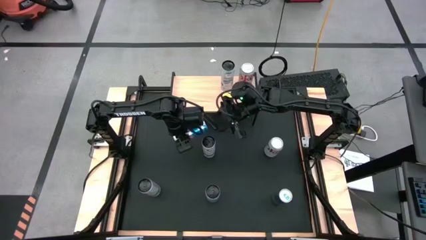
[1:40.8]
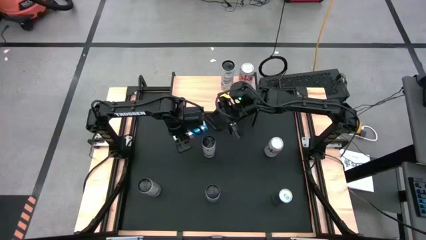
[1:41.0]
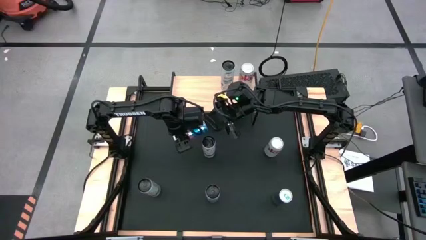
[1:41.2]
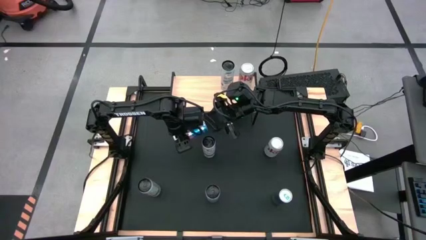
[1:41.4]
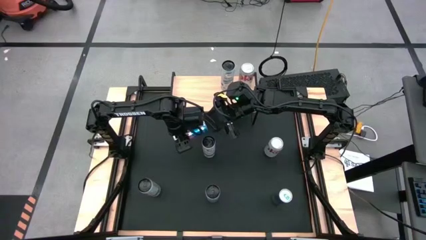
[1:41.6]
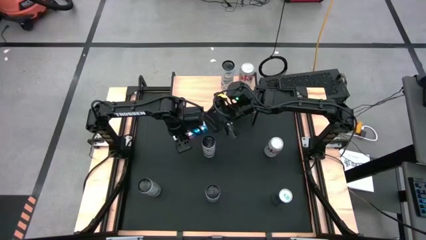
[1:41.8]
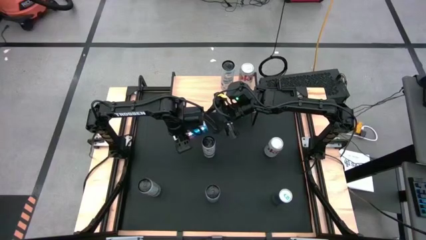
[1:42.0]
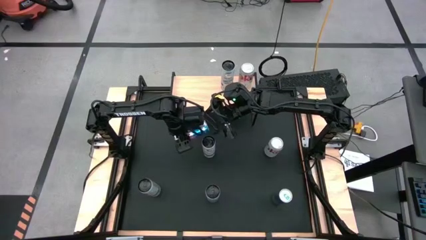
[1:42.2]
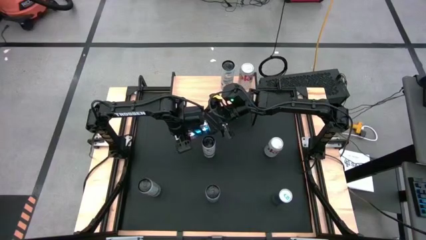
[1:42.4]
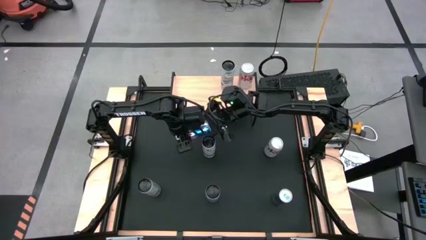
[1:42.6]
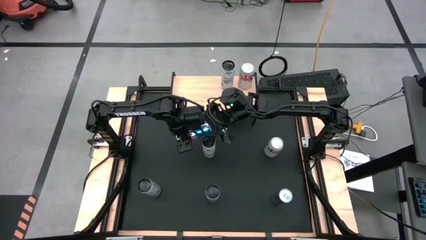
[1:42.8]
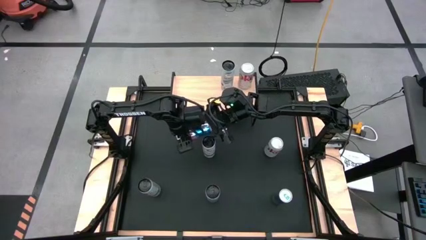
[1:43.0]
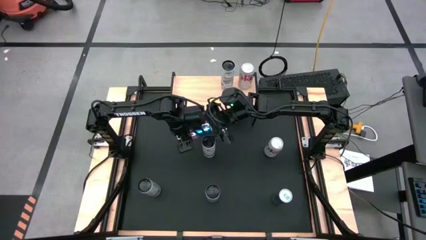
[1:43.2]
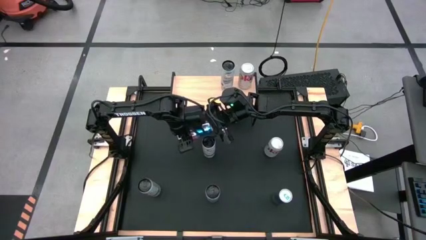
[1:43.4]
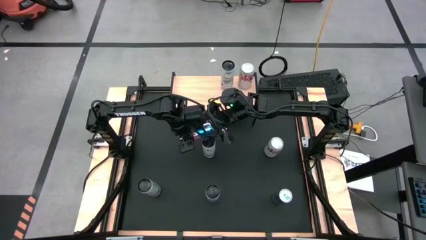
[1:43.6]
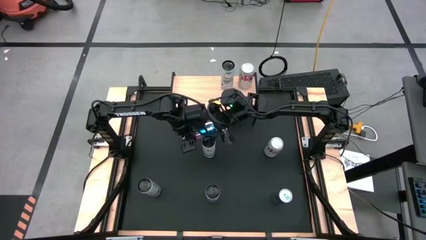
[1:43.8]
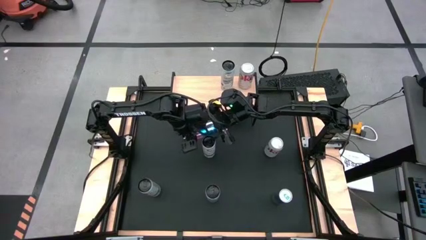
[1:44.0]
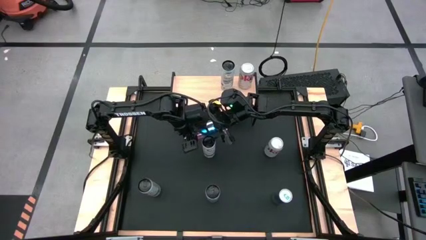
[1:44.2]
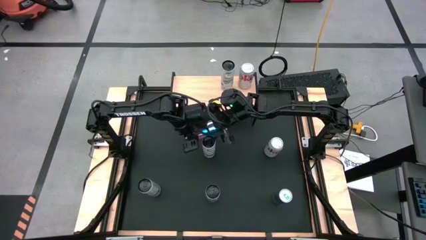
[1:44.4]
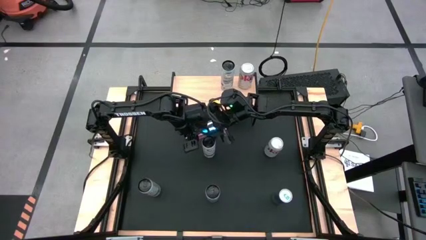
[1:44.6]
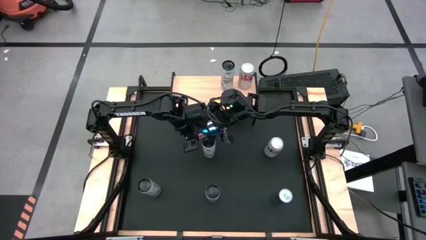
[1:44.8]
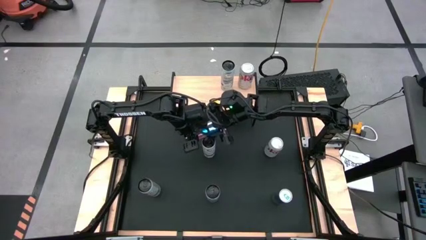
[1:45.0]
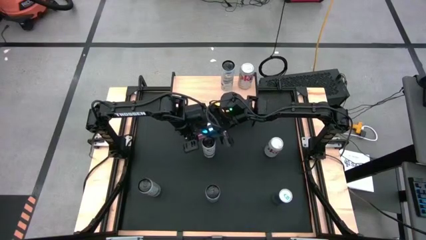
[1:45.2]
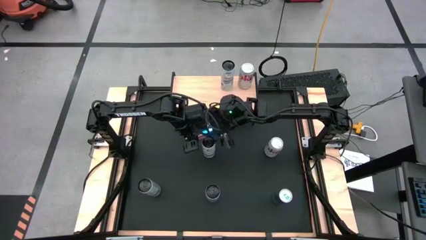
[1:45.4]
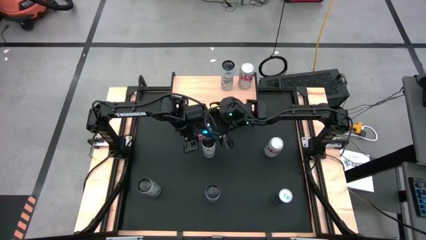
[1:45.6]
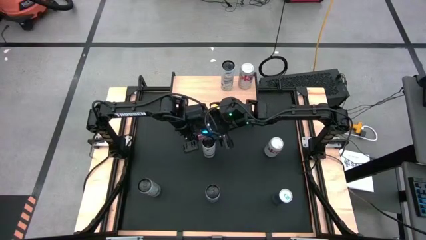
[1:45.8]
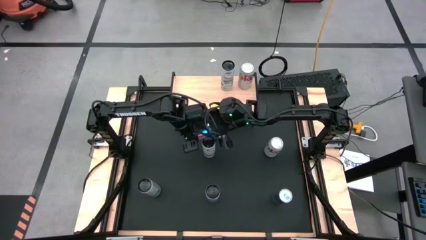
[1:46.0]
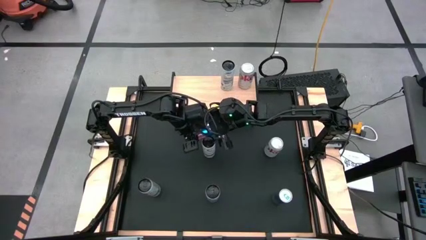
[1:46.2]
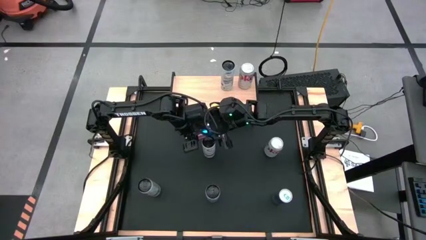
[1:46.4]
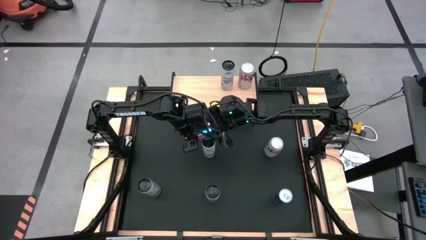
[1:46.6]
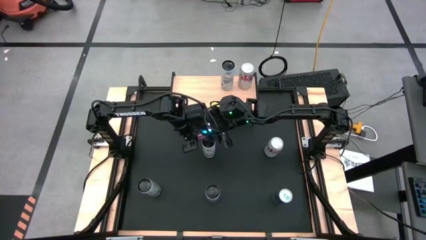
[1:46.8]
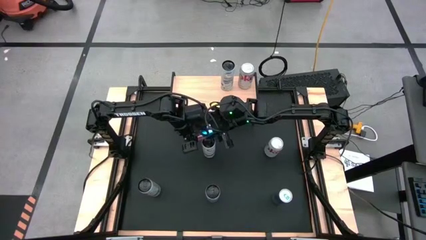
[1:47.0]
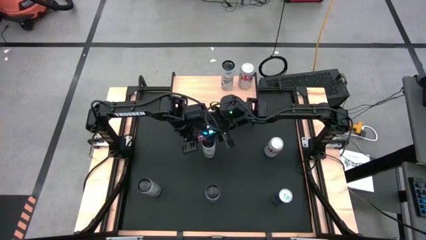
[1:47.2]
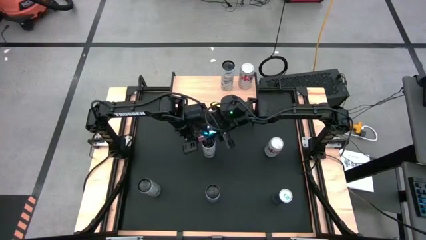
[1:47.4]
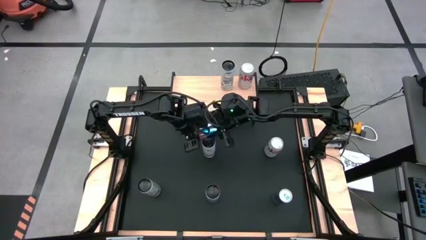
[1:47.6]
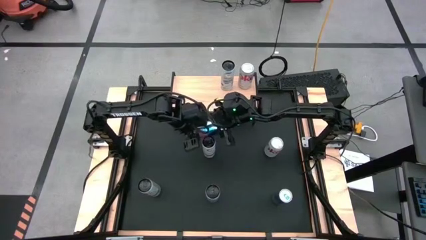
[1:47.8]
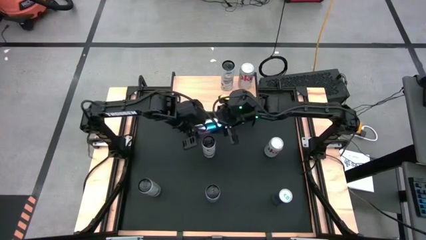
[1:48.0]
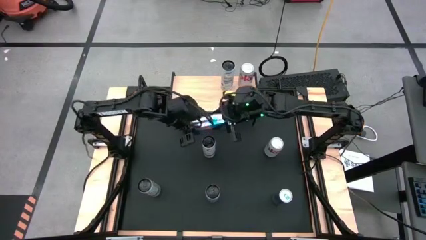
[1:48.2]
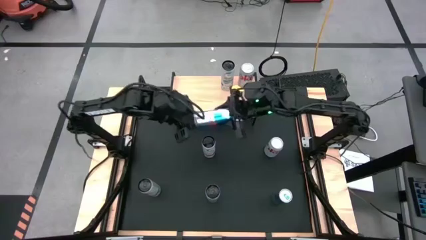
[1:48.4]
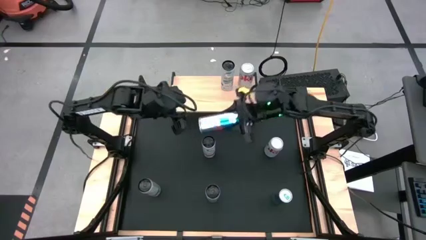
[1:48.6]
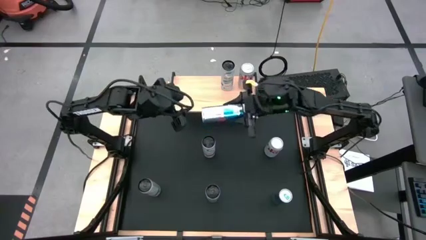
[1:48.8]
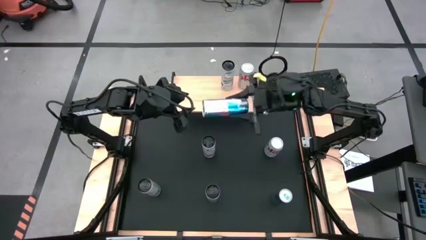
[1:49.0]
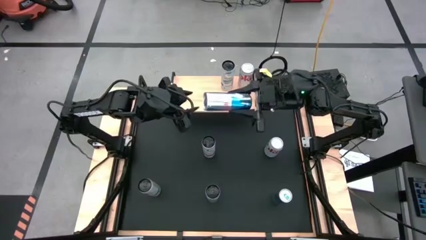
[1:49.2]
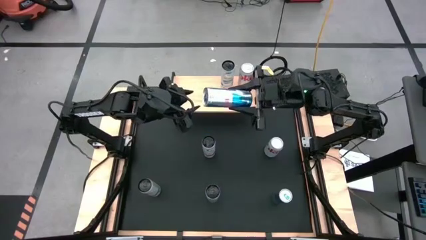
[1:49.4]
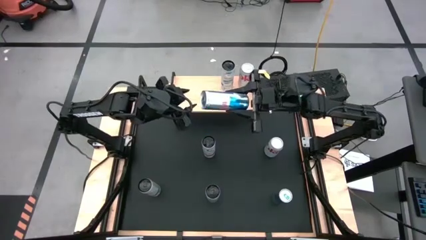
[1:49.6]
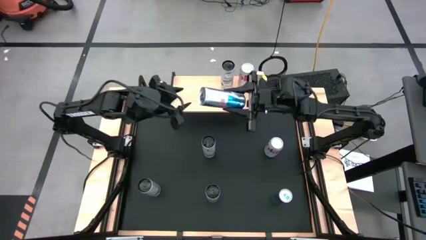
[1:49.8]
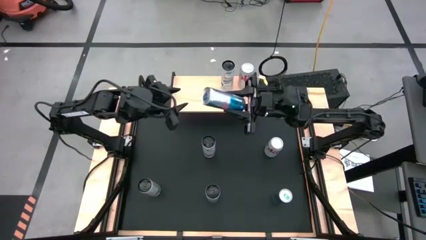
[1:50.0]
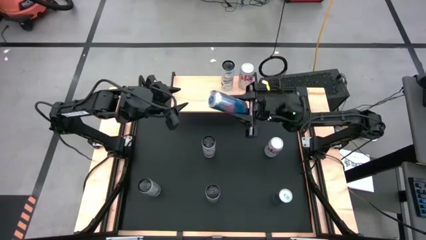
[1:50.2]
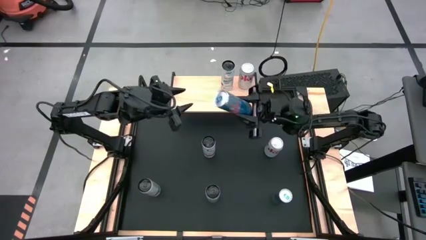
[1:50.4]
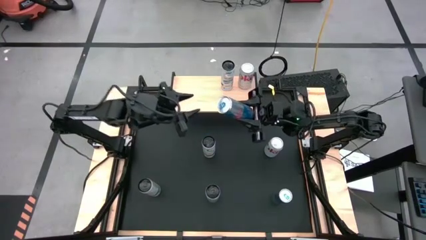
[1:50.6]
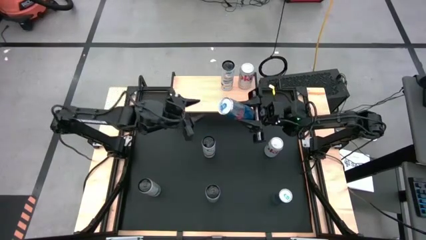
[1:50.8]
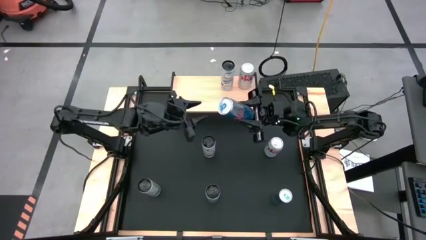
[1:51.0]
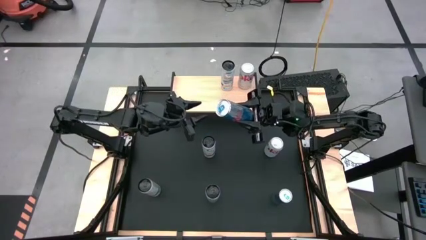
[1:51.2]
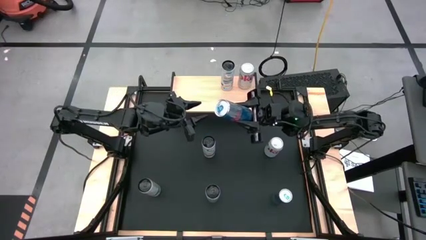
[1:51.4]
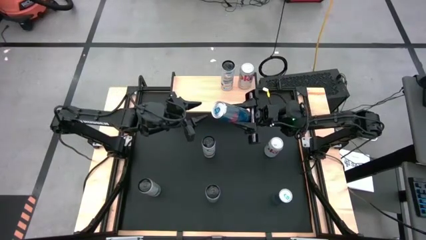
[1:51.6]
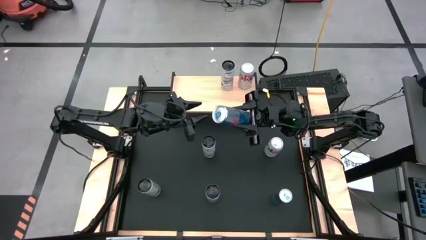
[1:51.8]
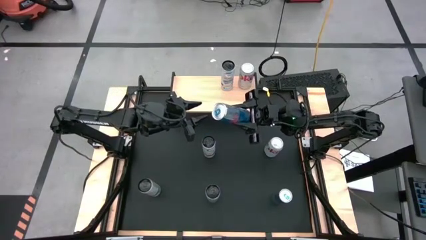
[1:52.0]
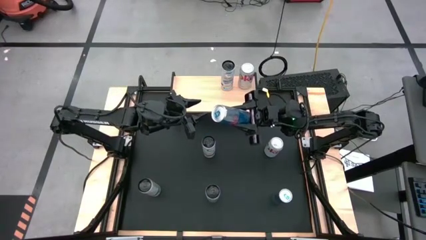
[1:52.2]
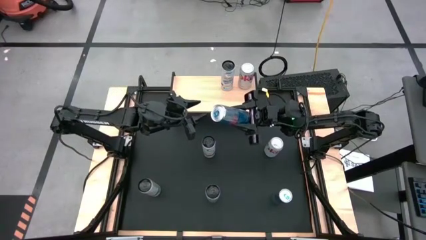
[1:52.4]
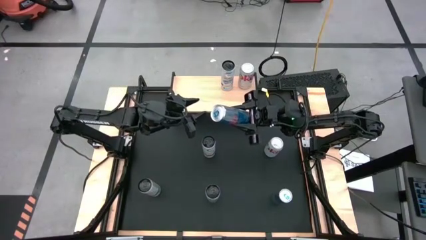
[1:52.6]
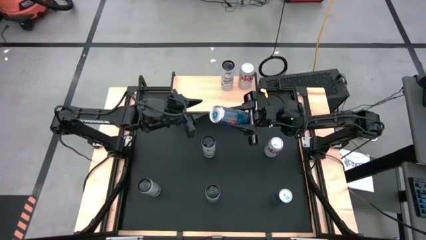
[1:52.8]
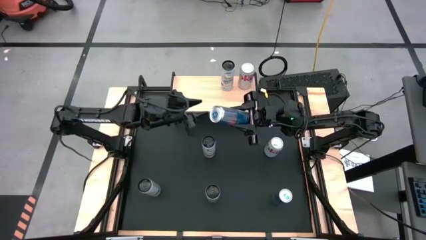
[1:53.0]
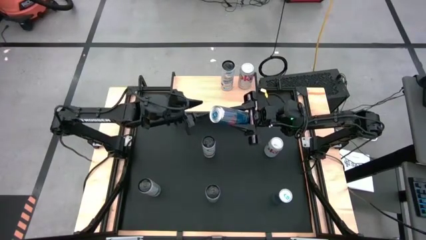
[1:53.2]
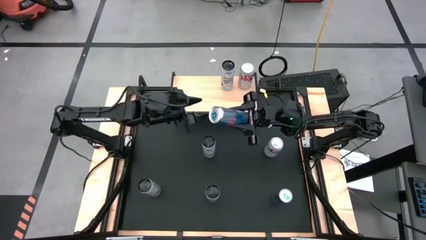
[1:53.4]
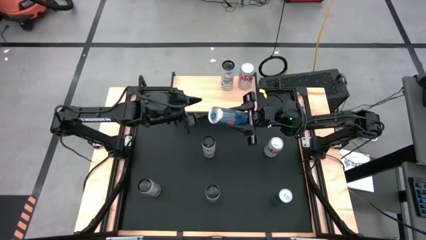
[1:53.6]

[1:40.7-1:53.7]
Task: Place canned beverage on shelf
Put the top left blue soda can on the shelf

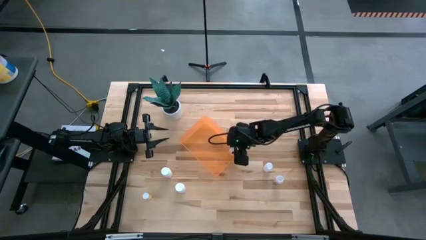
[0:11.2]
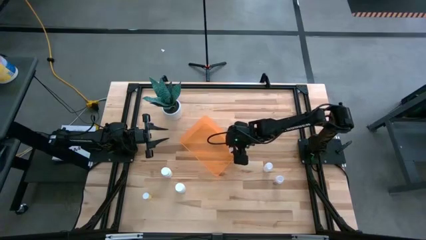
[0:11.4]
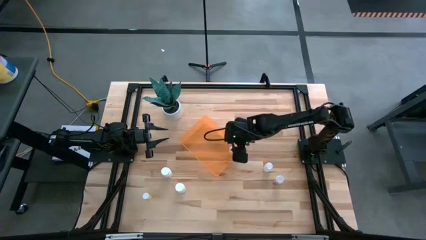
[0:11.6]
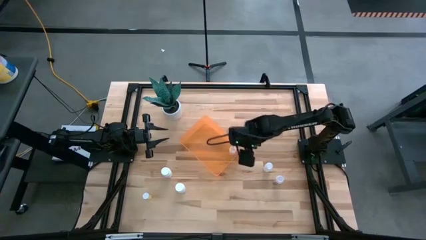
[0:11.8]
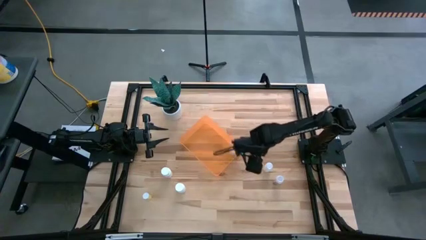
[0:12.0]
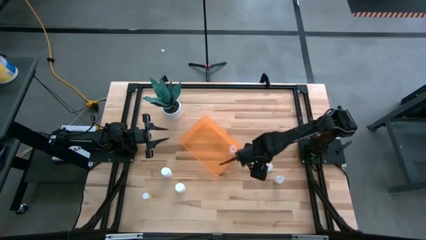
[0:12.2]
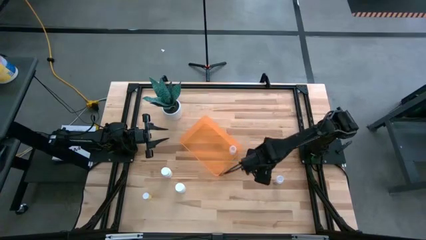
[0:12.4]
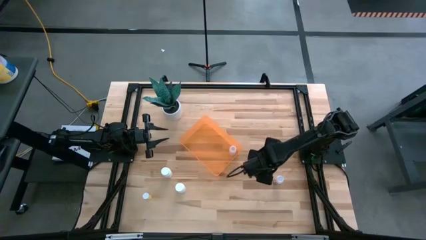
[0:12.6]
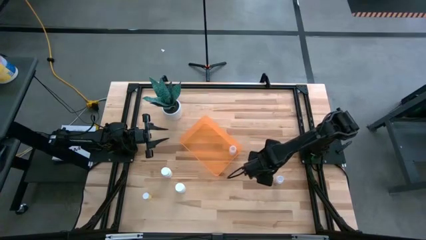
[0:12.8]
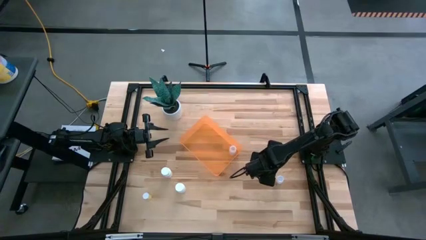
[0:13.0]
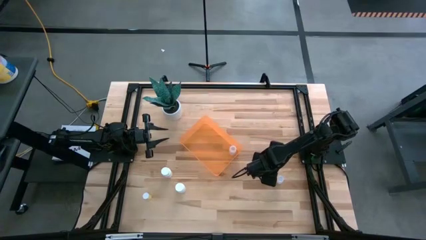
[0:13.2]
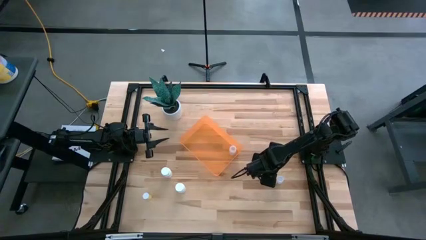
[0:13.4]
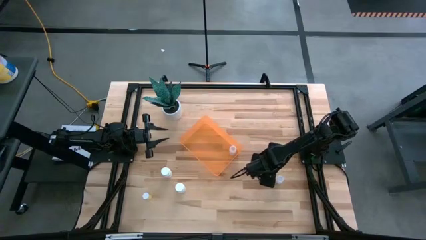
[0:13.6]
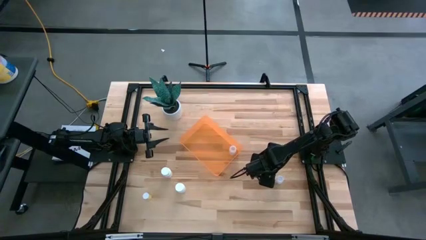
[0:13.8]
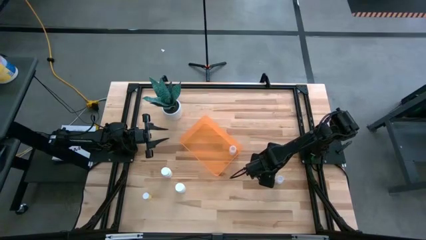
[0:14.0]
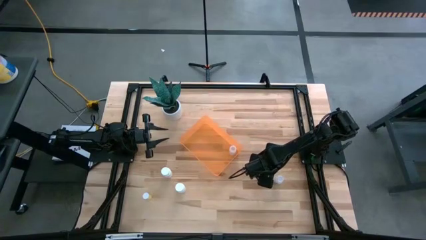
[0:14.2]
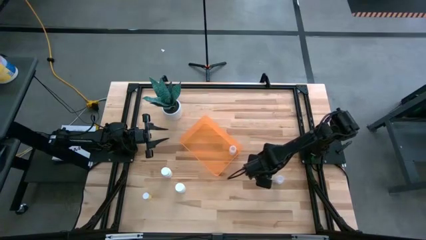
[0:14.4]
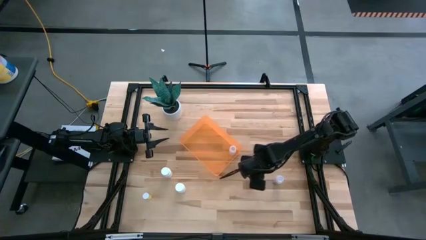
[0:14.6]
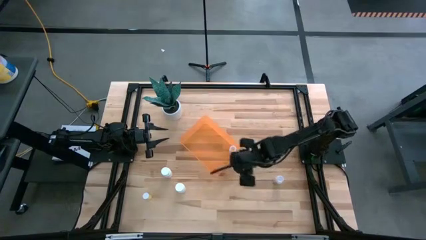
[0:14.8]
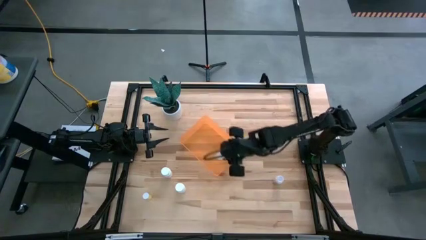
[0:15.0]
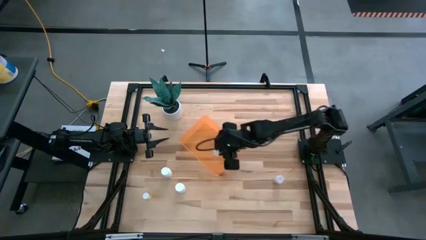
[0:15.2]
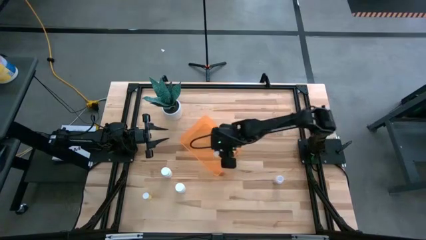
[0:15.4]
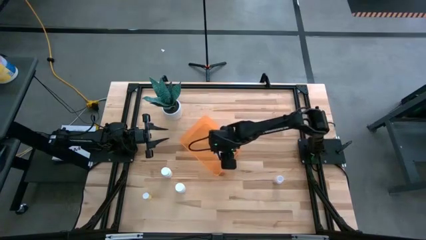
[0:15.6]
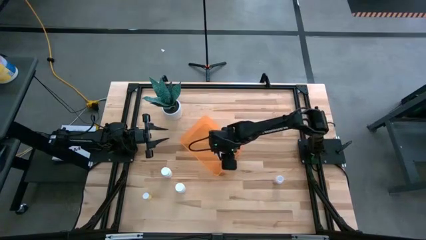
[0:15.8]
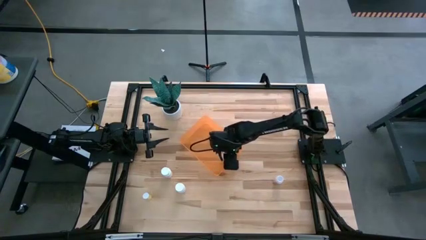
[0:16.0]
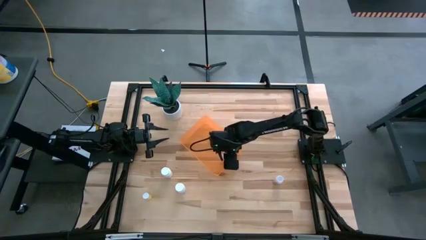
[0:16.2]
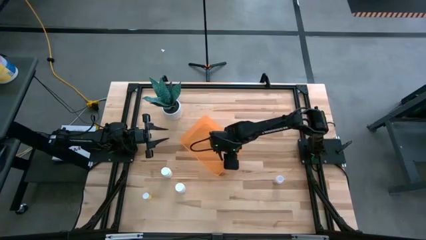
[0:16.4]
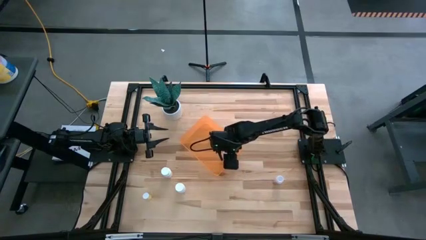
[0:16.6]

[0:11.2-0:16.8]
Task: Pick and place pill bottles into a basket
Put the top transparent pill bottle into the transparent orange bin
